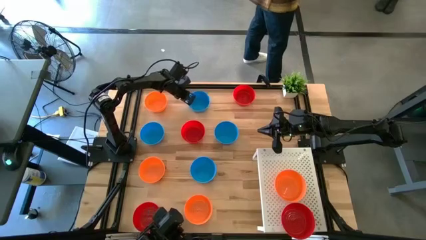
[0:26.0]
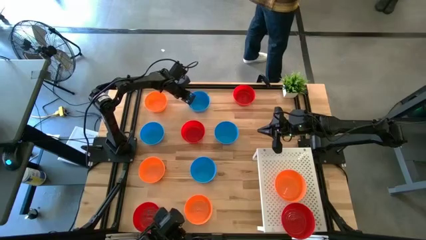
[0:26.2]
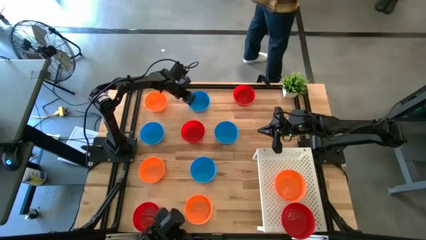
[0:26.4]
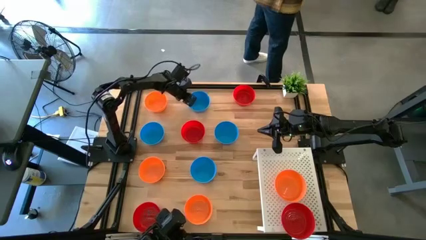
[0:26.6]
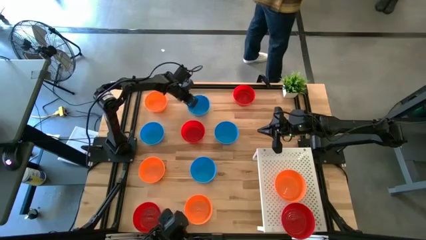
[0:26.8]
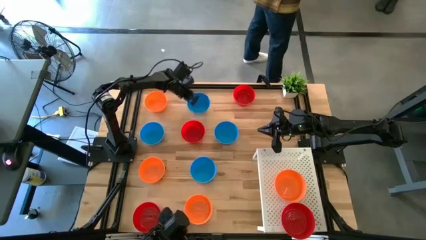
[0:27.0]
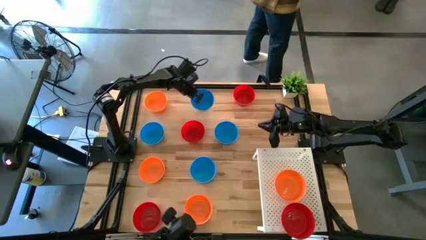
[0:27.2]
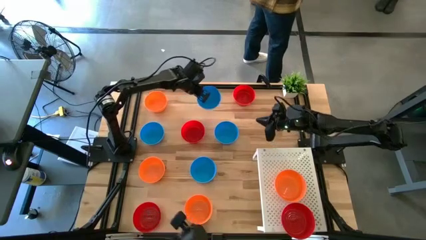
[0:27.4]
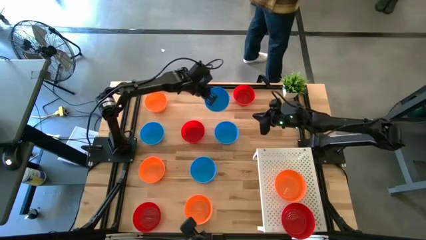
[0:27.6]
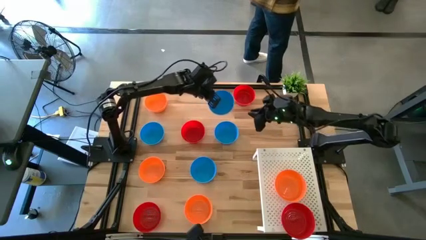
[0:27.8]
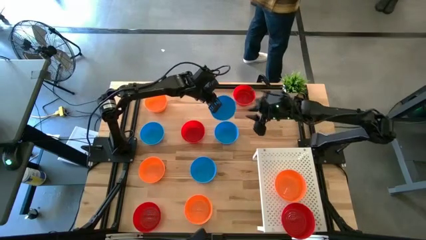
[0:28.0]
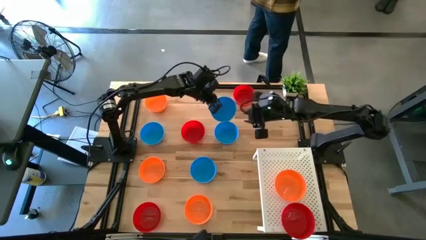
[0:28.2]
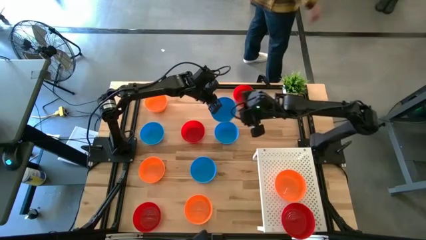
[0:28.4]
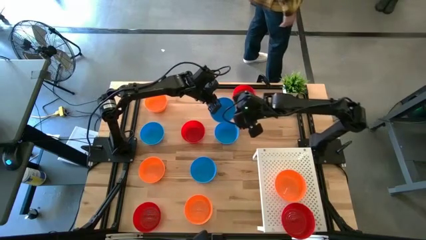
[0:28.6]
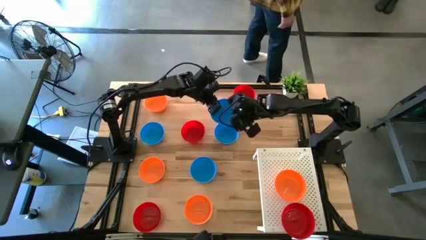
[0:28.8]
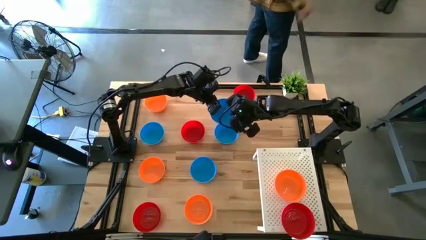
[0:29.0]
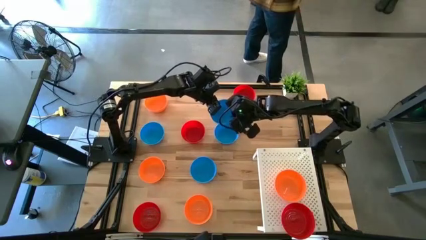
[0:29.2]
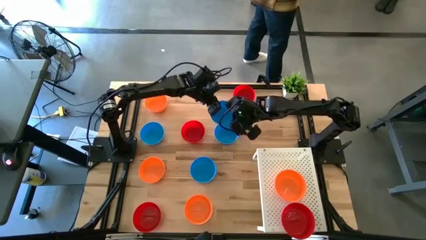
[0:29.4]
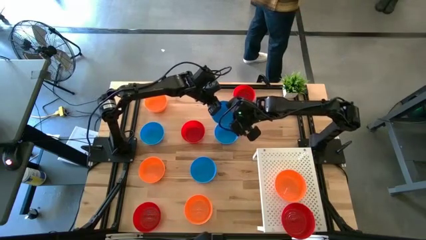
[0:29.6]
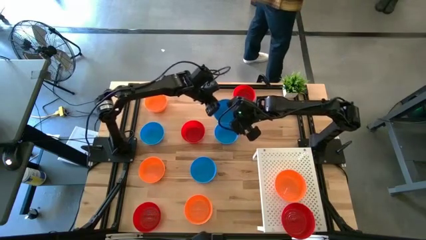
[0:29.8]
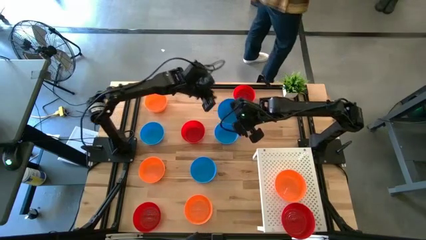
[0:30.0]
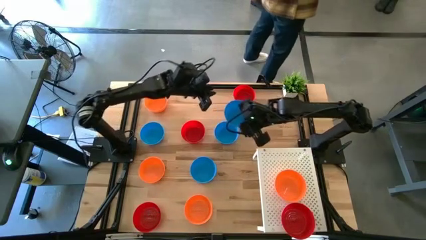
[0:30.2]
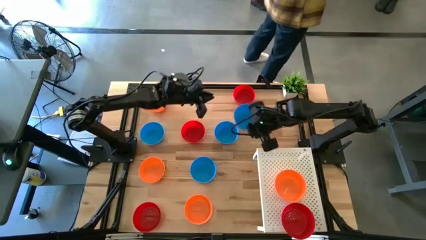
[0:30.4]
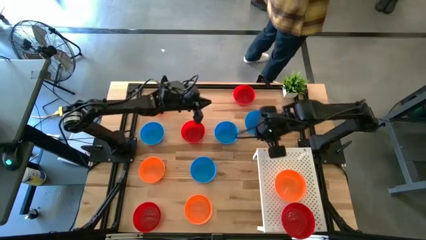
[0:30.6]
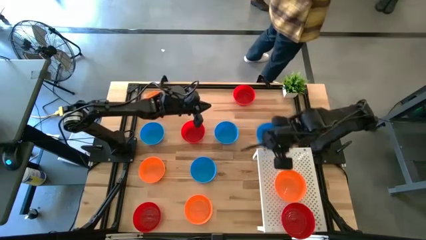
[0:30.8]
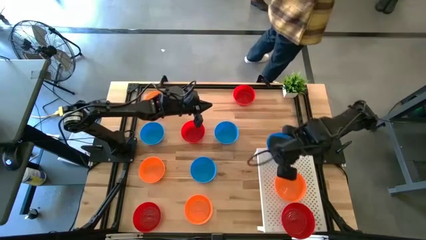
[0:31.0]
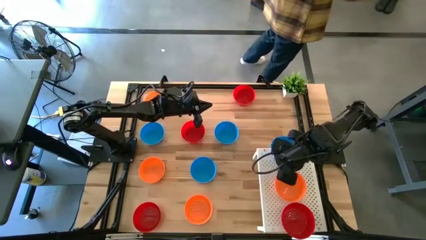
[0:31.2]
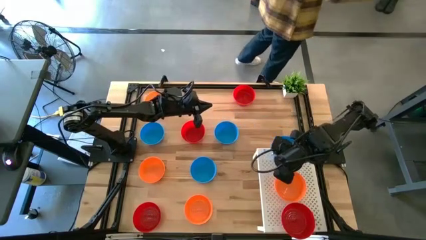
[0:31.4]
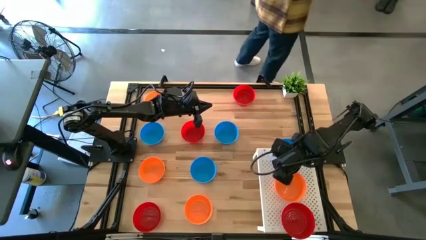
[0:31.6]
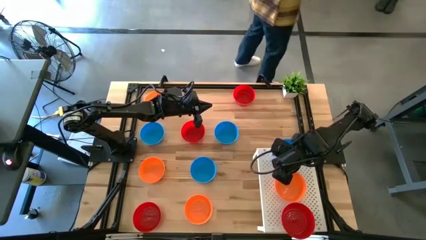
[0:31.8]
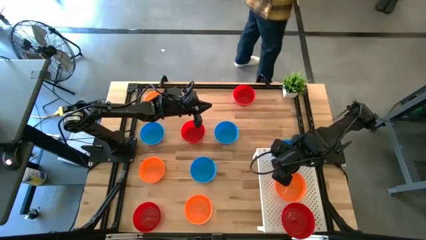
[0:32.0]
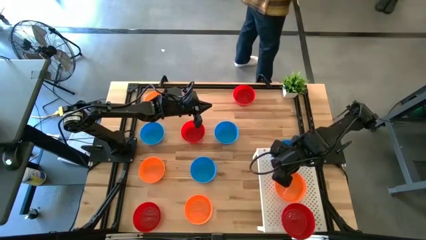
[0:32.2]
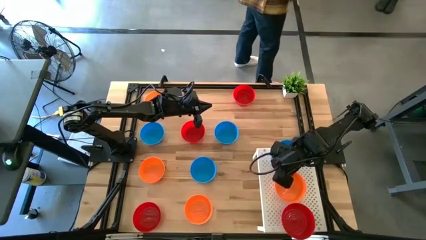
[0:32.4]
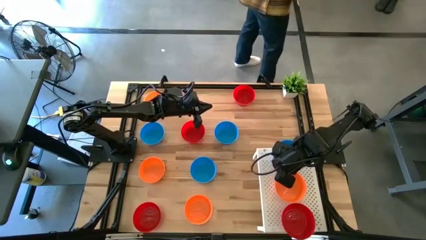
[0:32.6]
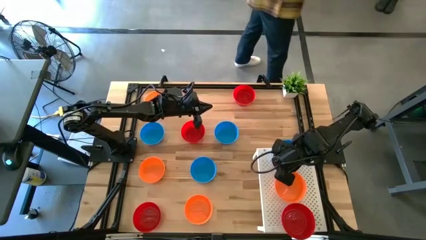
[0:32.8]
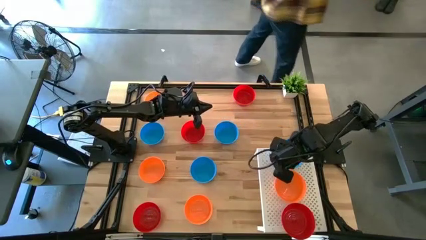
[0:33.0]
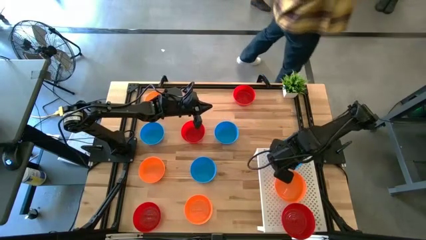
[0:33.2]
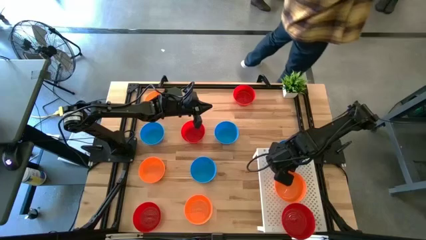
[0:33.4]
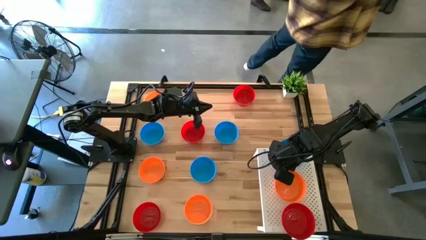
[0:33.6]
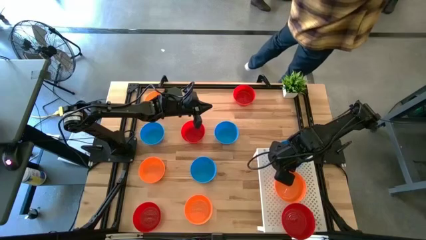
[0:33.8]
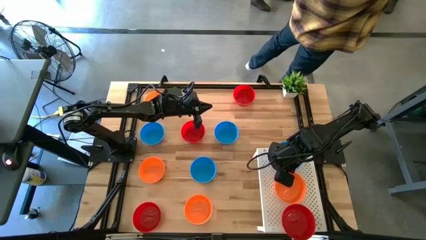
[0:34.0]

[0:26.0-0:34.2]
Task: Pick & Place Mini bowls
Put the blue bowl on the shelf

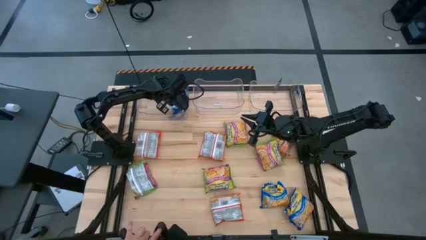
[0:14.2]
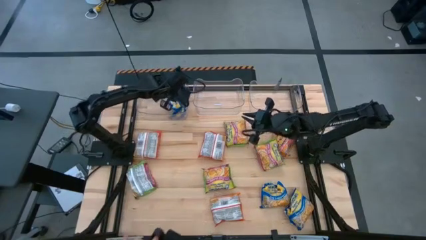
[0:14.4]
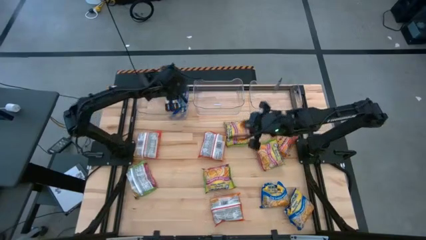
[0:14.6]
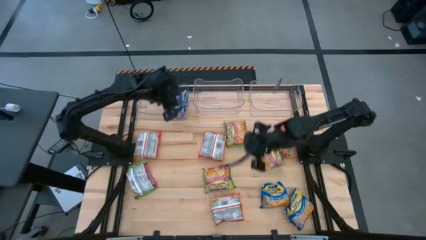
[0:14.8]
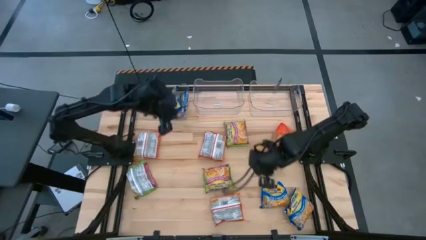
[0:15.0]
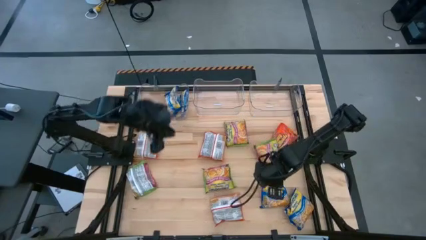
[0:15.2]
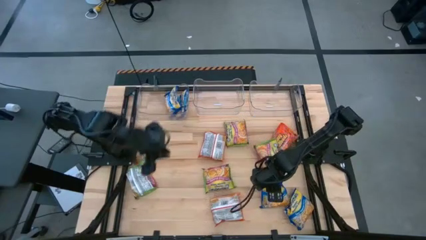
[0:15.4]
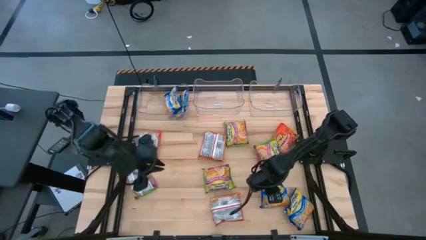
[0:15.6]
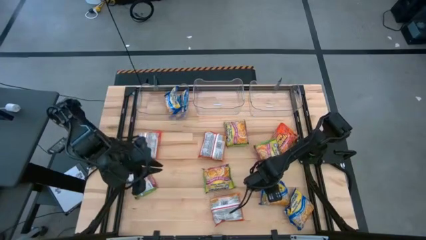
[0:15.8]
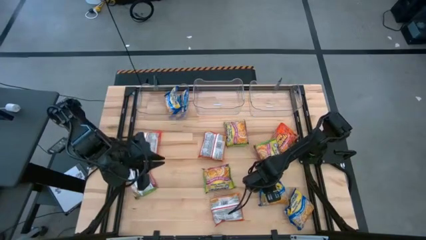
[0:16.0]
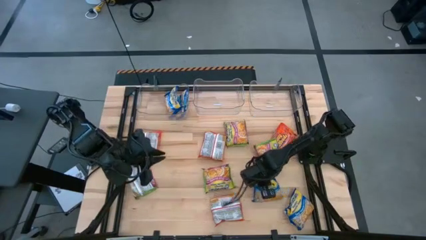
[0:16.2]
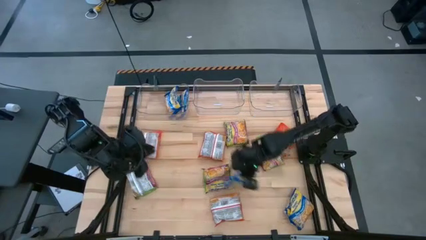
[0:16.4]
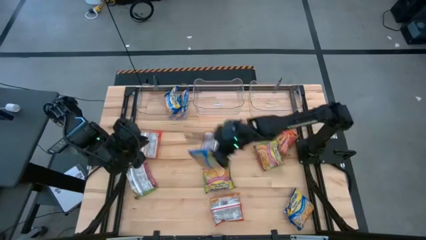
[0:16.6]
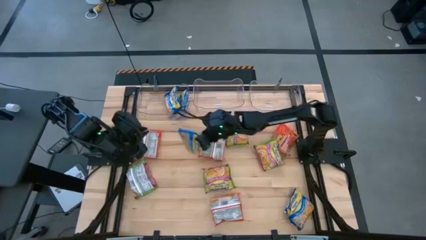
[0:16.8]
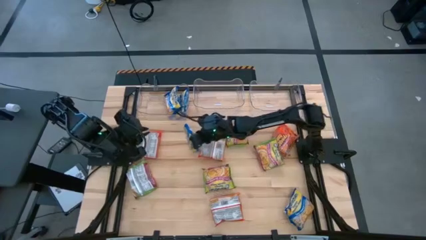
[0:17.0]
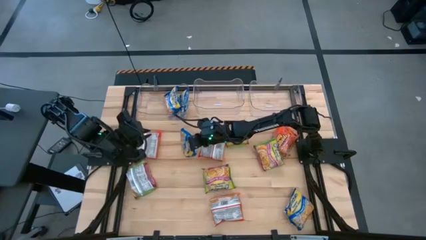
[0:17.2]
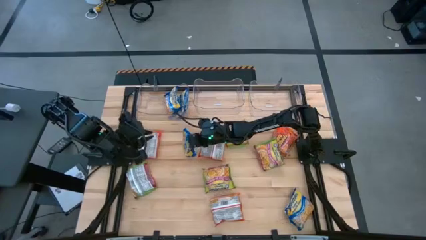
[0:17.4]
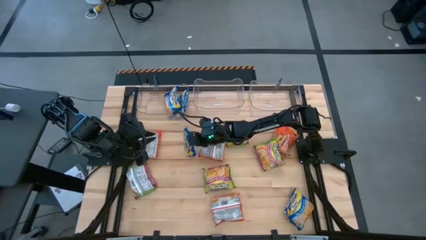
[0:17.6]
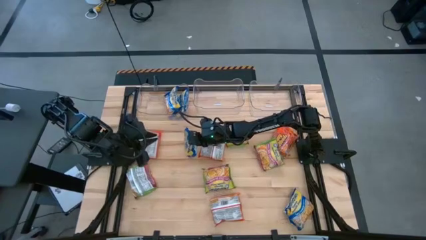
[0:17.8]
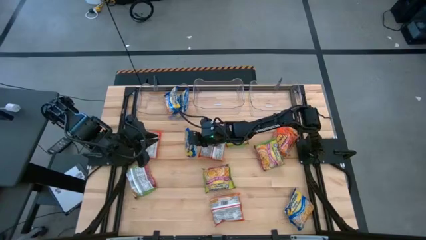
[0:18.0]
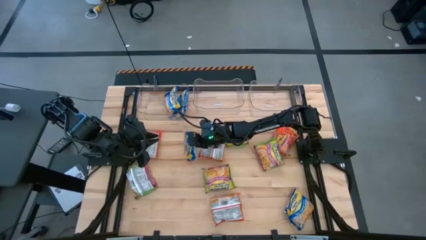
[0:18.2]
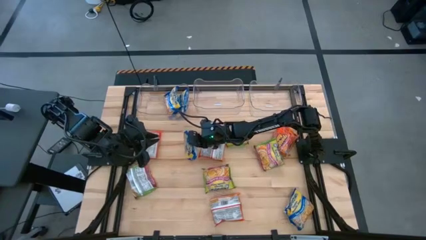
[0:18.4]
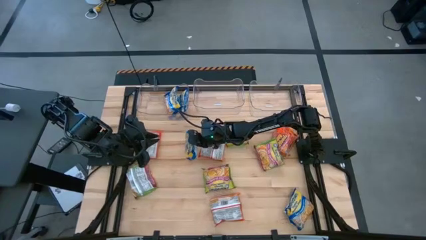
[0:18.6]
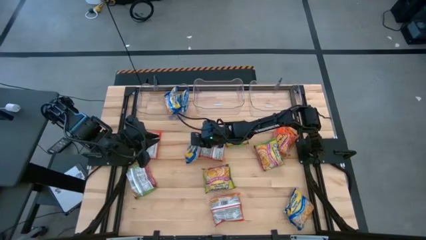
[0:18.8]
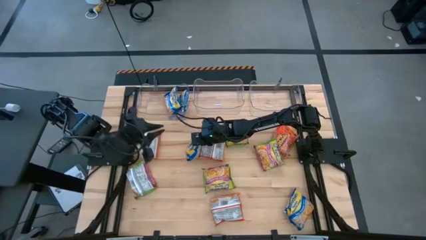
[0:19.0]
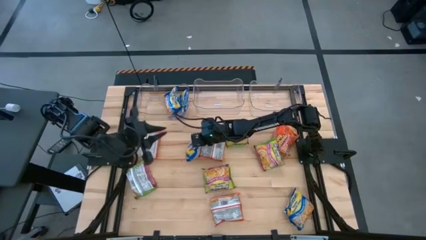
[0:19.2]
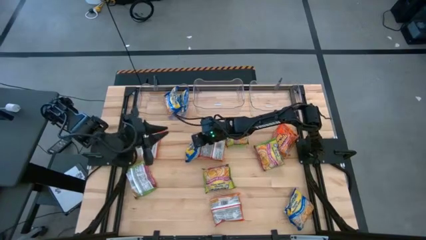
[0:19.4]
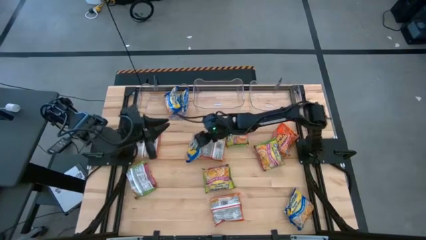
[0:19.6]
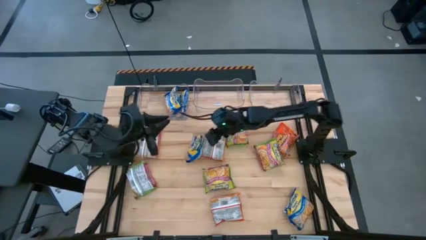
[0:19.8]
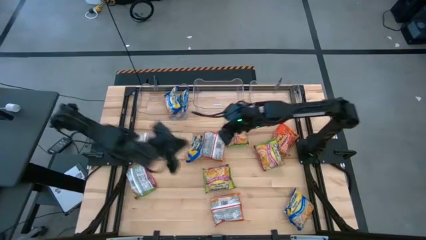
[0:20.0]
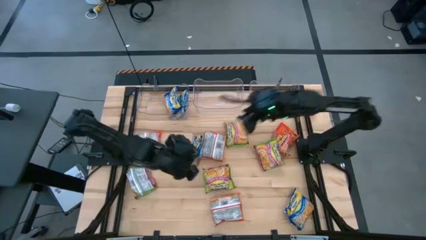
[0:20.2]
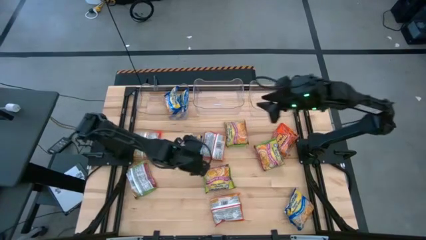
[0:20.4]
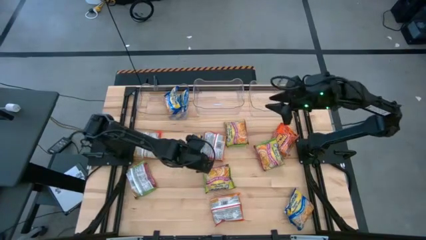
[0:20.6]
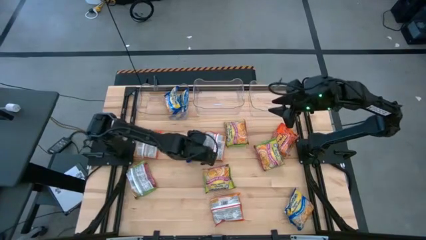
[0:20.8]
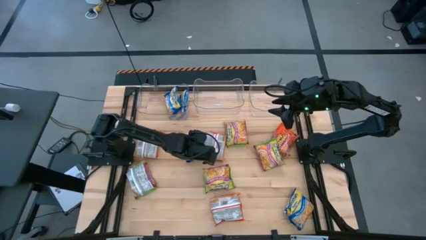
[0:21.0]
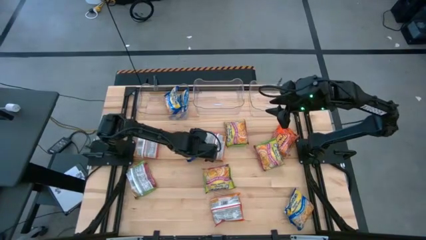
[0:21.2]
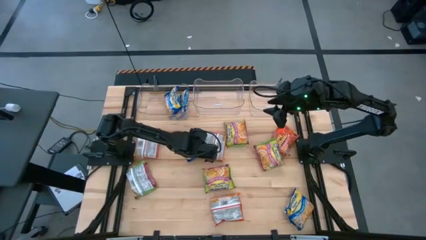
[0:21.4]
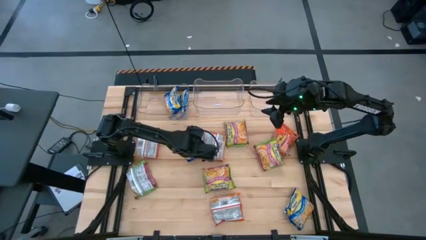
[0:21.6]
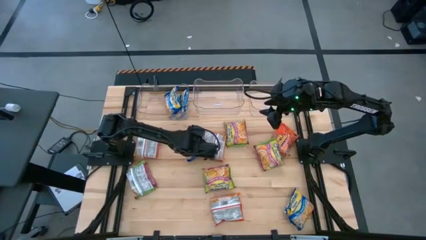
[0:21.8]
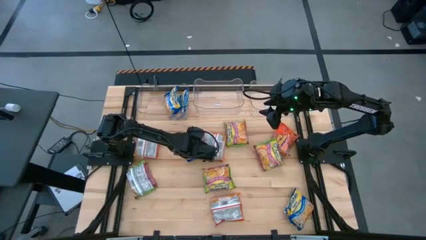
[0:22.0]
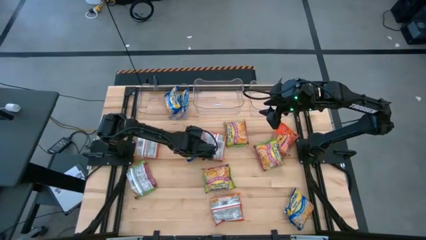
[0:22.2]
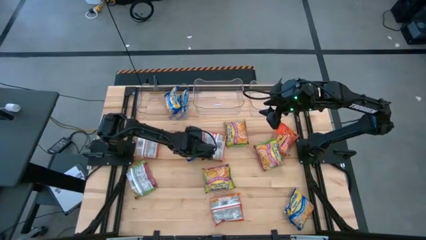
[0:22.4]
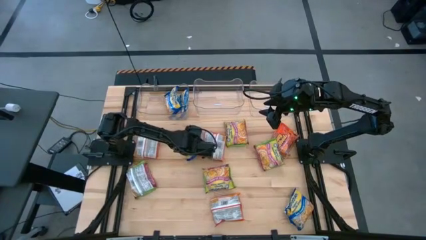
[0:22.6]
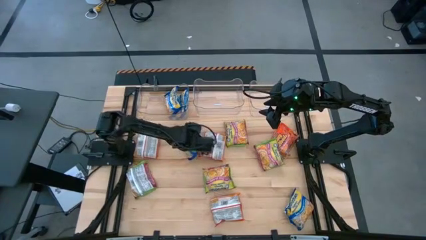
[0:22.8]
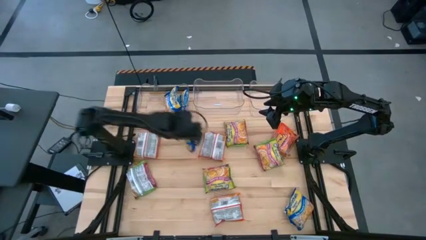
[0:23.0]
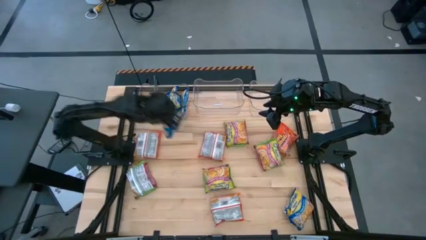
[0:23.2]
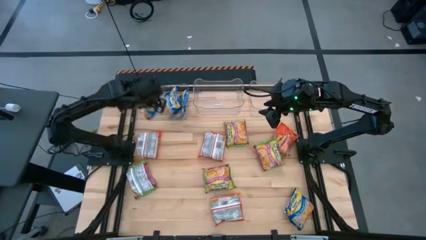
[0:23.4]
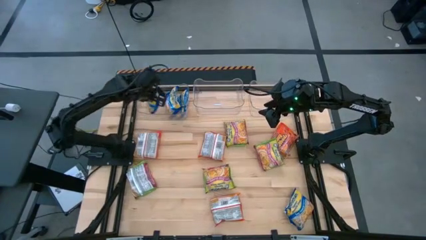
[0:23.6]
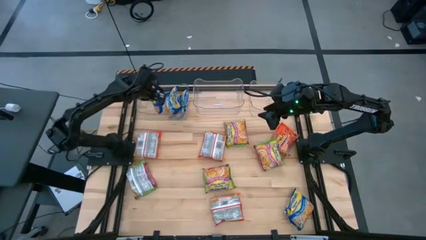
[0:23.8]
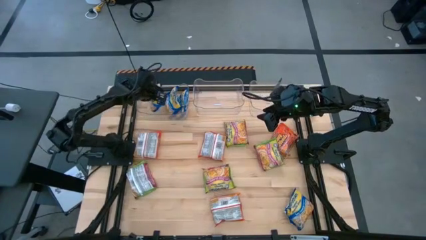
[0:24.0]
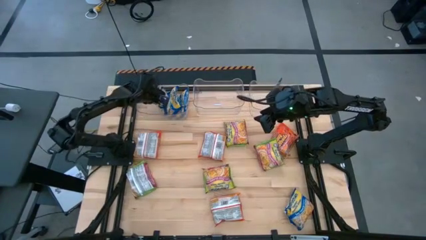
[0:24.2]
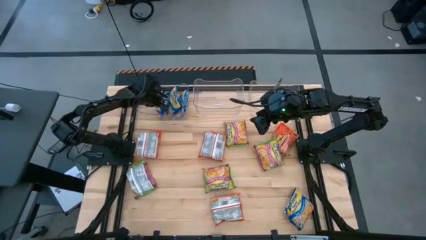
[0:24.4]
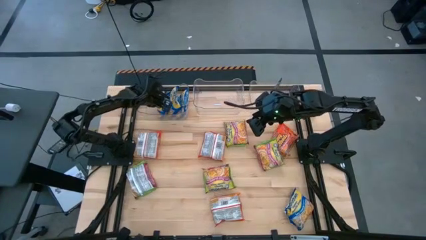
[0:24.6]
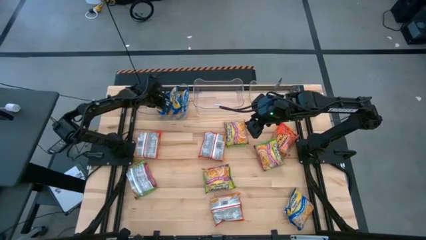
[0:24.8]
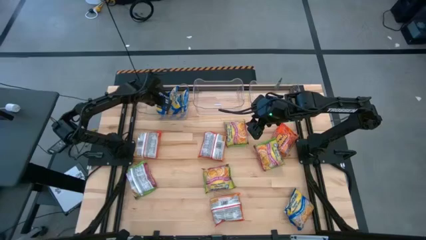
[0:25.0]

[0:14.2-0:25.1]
Task: Sort Maruchan noodles
Put the blue noodle pack into the left transparent bin
